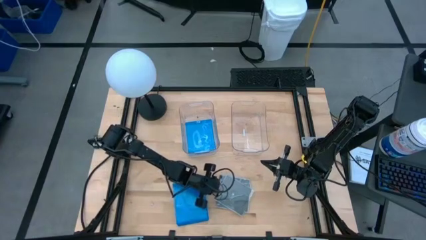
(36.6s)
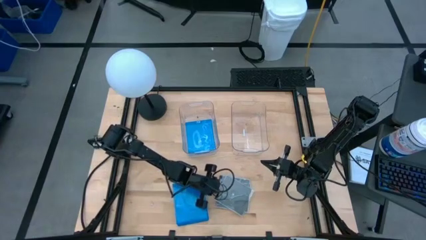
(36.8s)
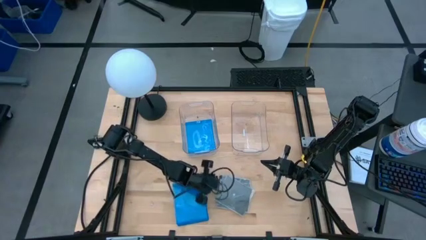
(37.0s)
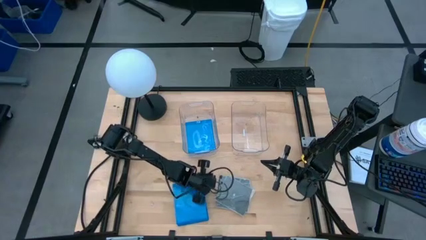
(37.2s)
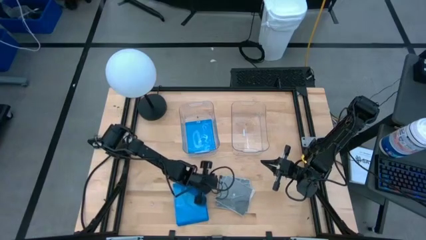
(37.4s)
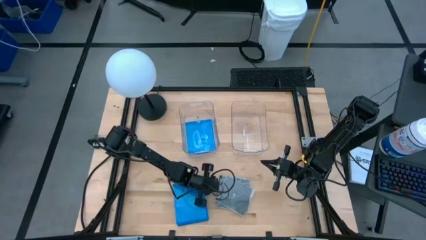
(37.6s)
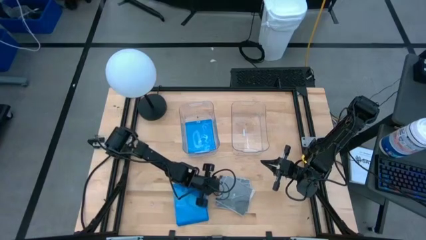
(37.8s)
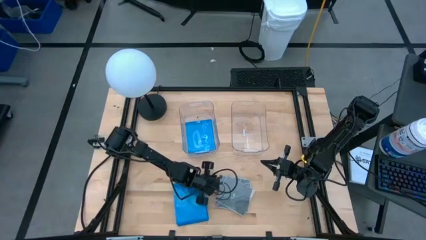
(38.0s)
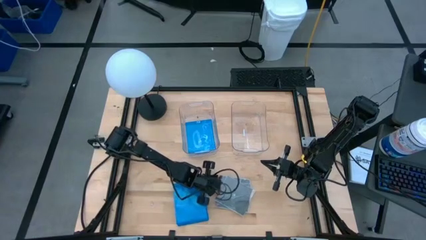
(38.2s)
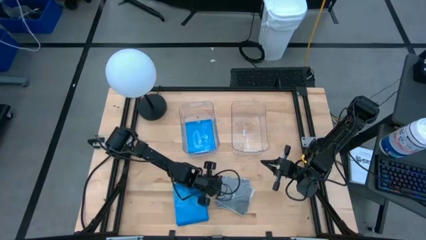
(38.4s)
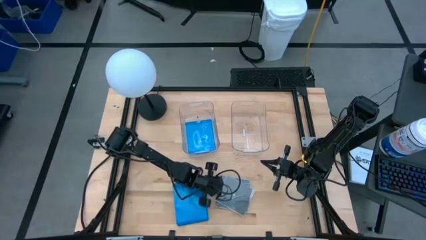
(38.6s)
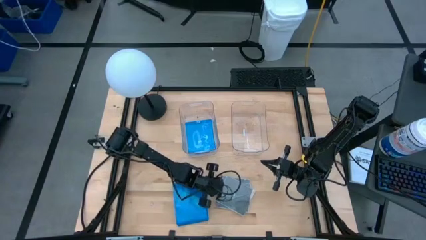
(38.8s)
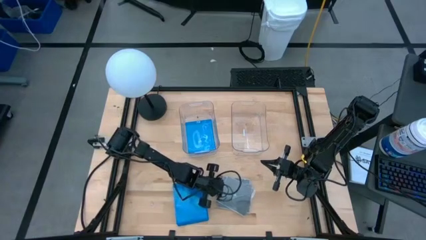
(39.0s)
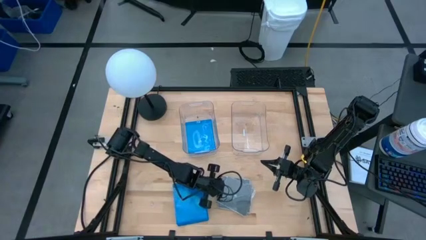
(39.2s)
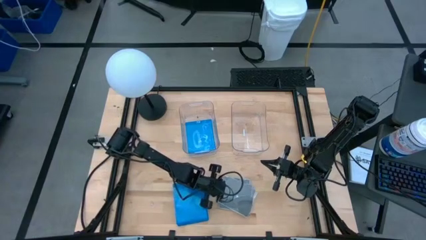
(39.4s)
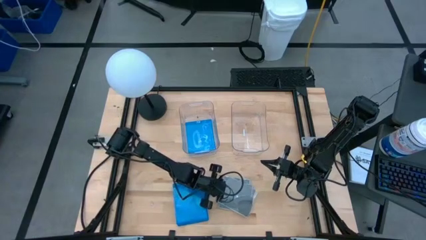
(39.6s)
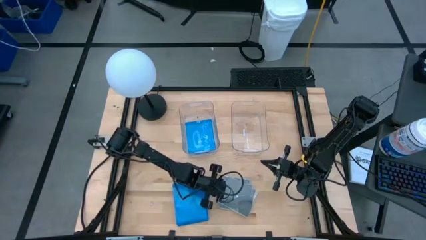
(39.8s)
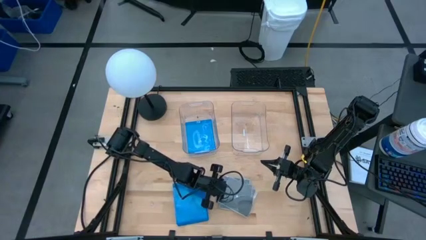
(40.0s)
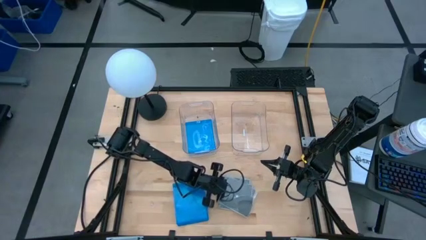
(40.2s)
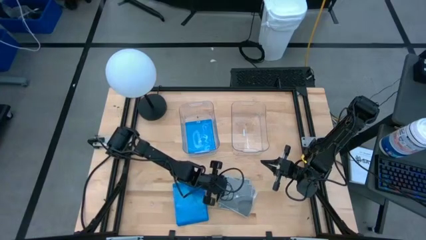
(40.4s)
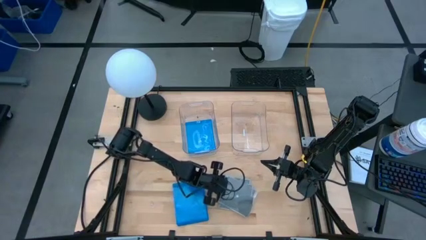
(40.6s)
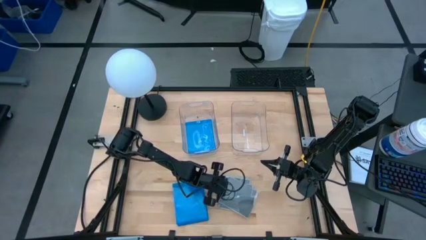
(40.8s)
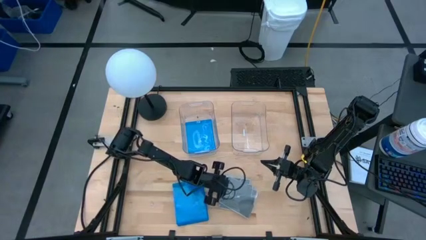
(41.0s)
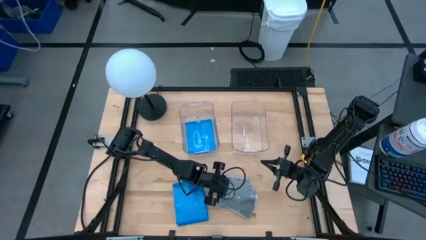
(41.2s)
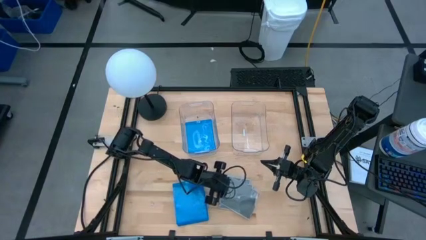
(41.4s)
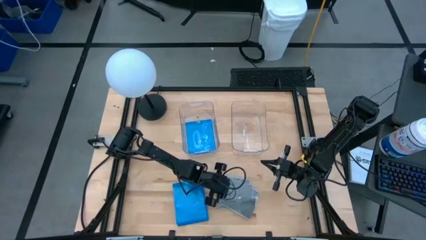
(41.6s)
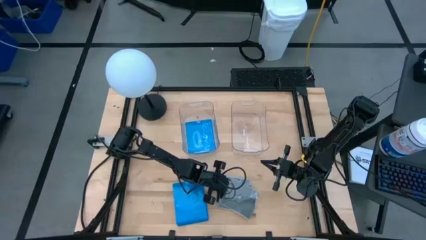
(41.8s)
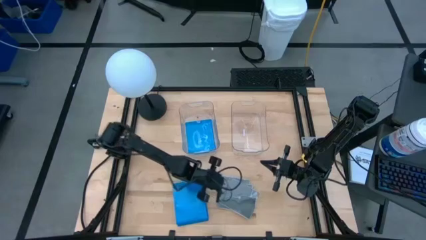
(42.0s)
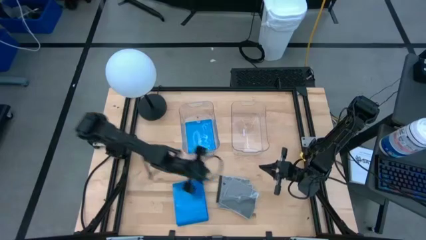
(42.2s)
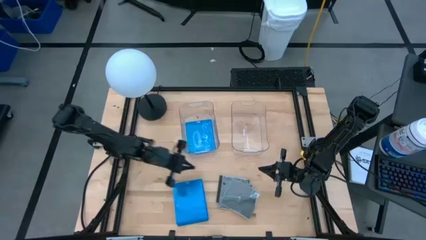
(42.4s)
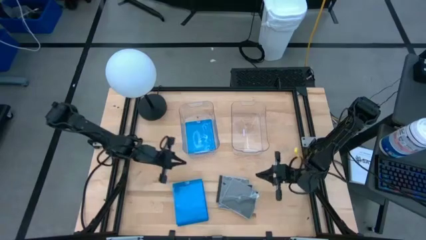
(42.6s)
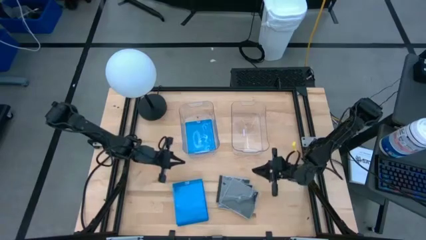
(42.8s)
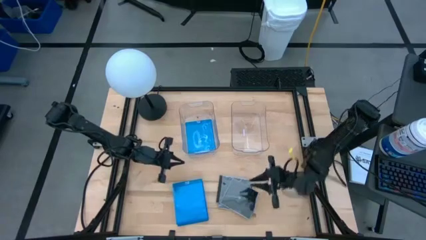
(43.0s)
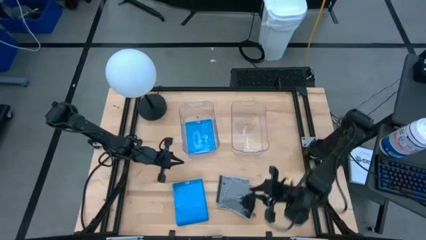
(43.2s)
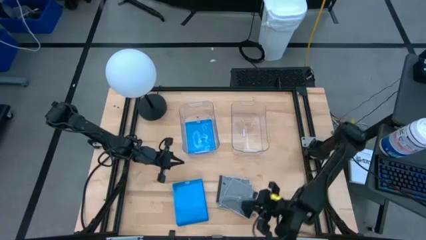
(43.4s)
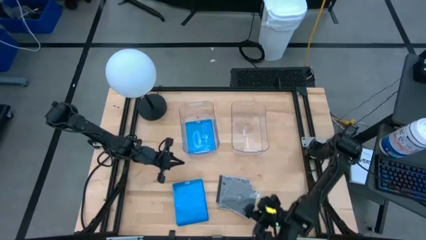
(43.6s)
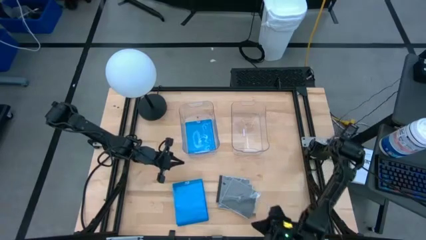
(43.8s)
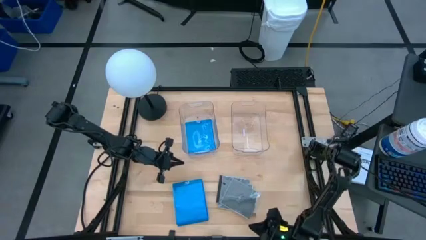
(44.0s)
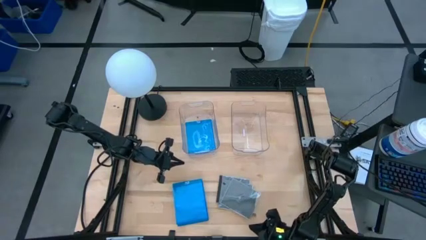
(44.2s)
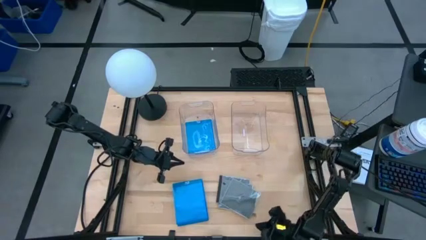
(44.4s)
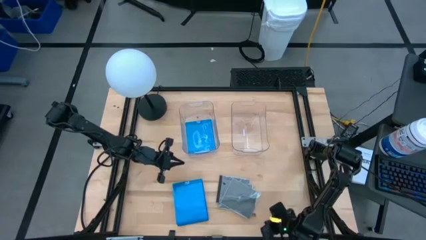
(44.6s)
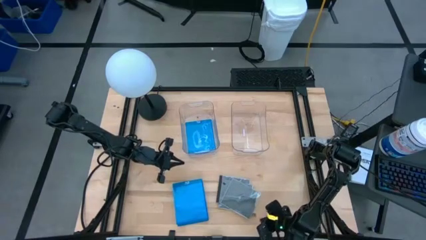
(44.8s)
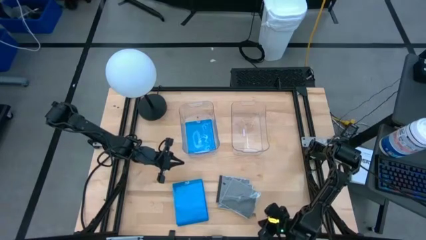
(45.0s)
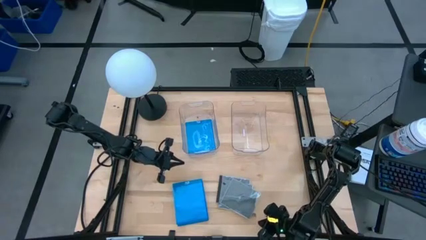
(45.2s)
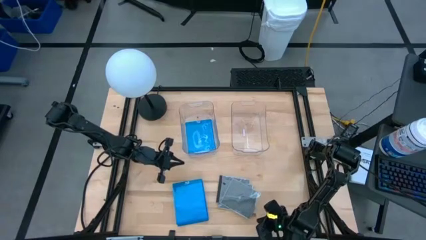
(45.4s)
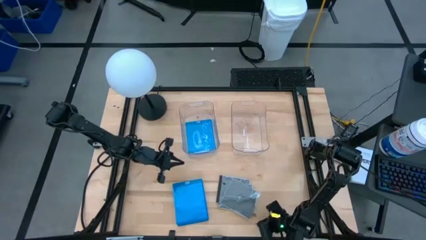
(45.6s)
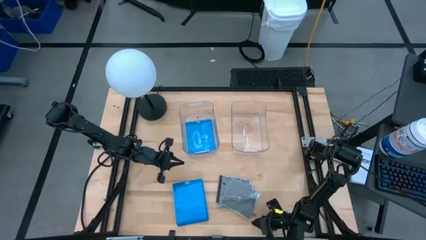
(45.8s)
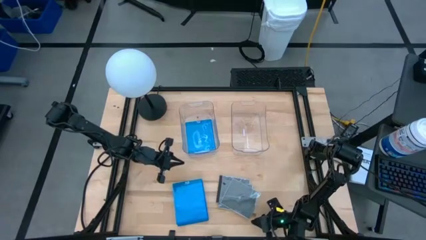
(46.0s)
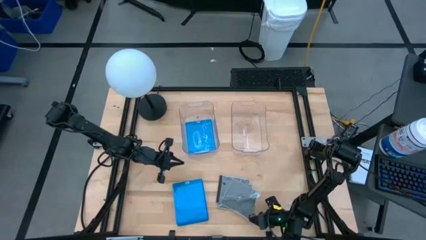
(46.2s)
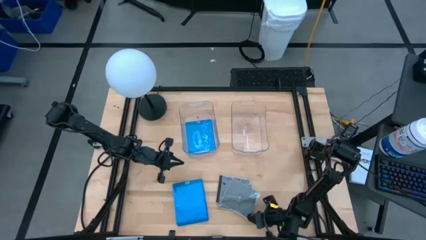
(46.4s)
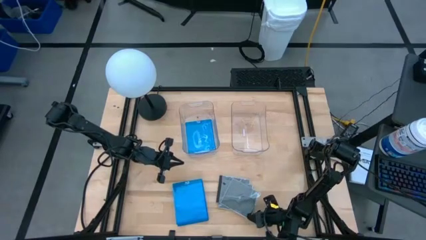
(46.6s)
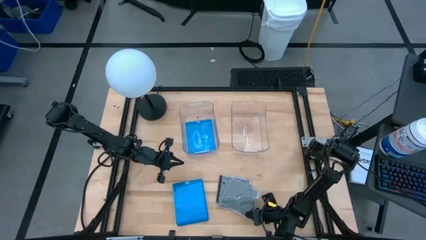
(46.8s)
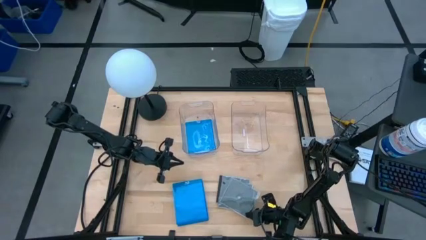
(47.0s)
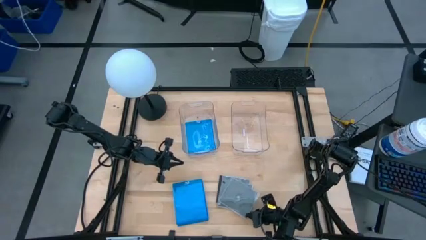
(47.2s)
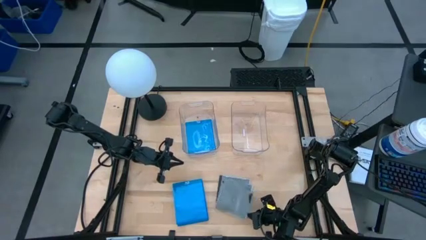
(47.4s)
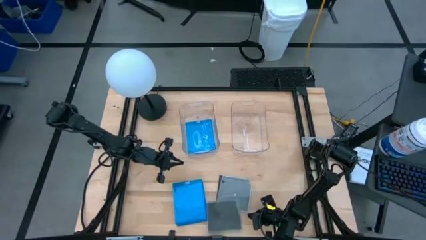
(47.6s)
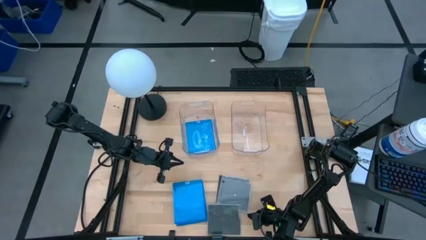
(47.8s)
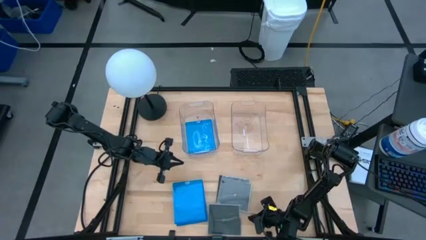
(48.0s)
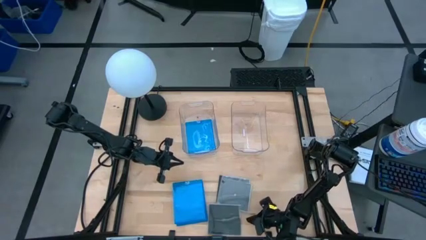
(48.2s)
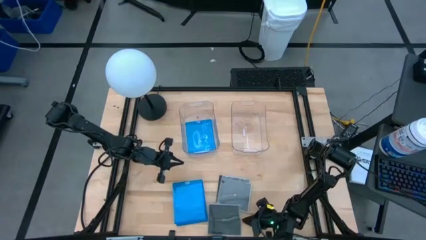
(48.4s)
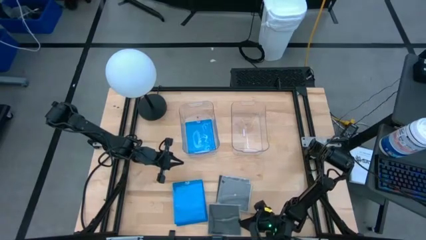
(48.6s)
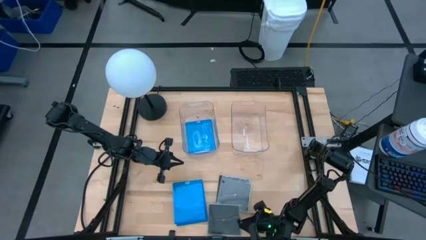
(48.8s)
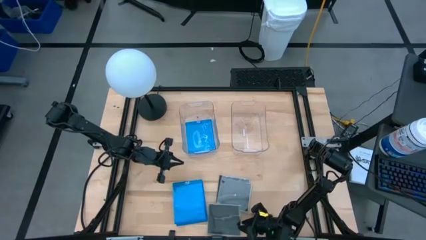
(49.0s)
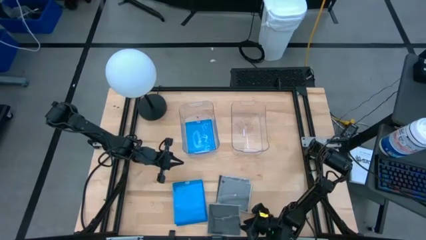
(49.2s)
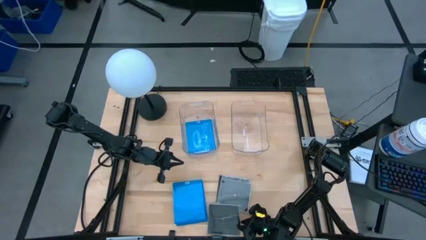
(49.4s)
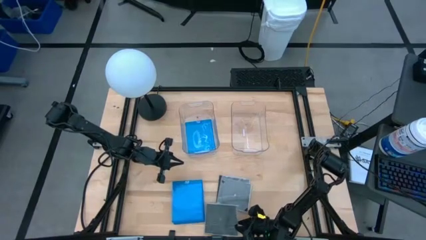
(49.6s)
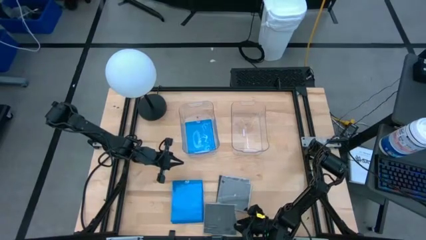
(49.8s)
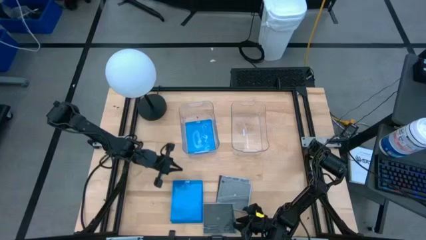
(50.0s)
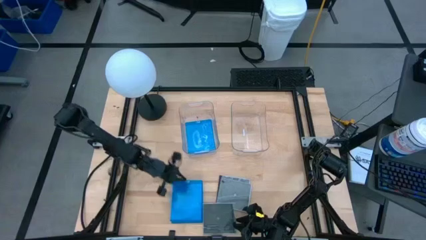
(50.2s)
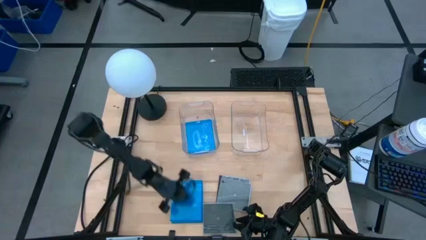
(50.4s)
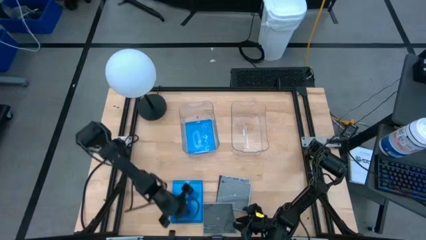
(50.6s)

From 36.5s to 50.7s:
Task: Pick & place jewel cases by type
Put the black cd case into the right transparent bin

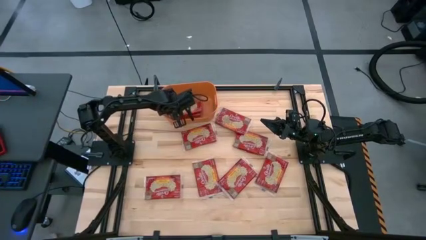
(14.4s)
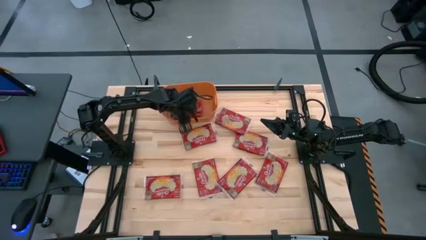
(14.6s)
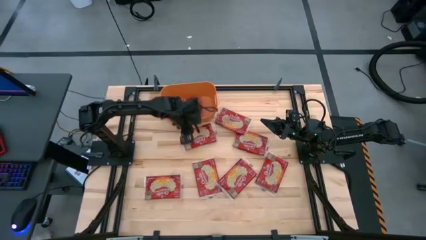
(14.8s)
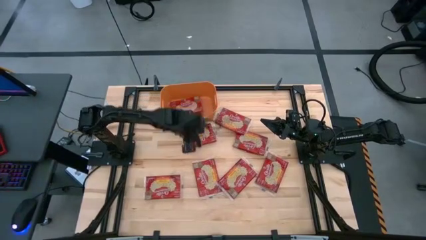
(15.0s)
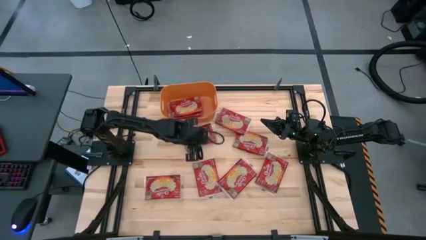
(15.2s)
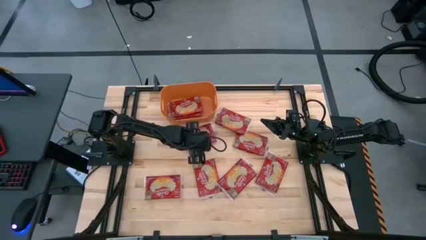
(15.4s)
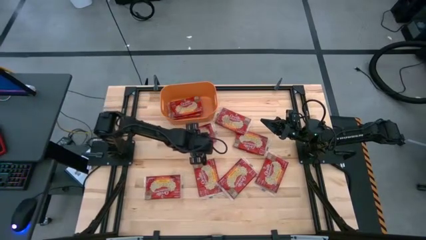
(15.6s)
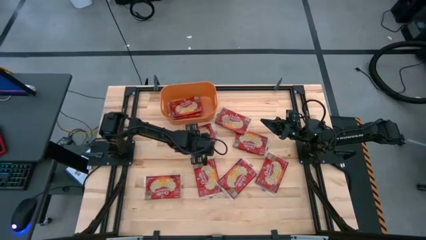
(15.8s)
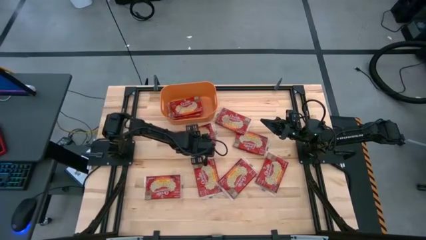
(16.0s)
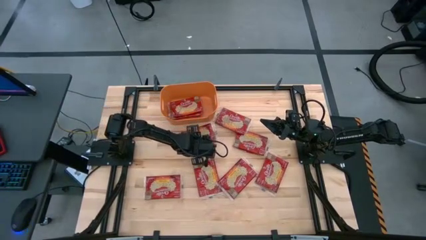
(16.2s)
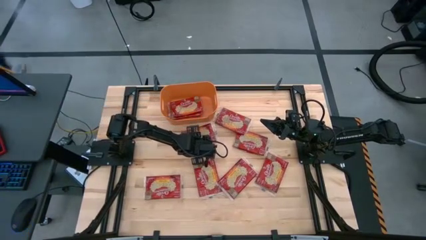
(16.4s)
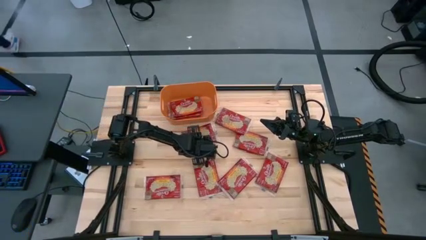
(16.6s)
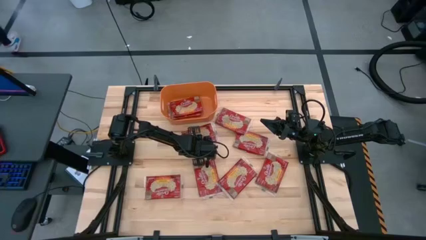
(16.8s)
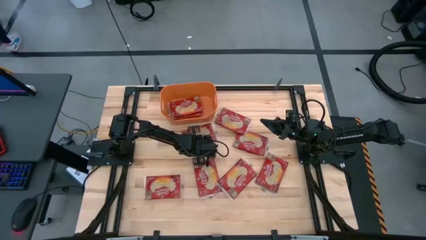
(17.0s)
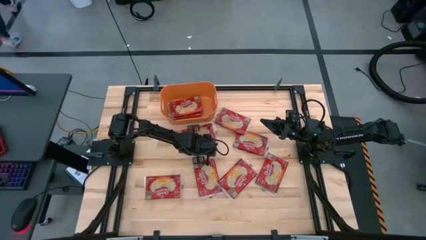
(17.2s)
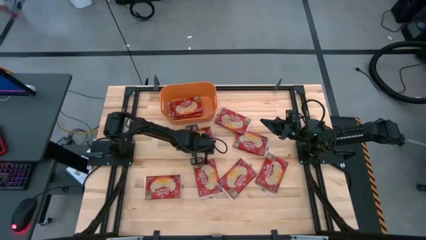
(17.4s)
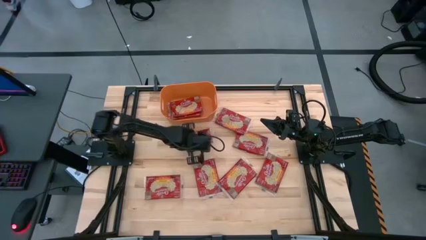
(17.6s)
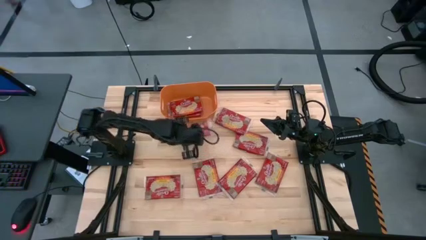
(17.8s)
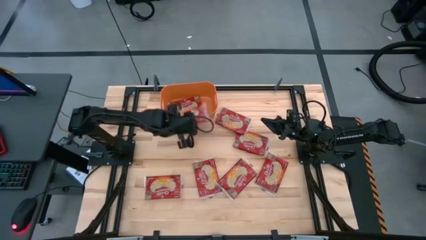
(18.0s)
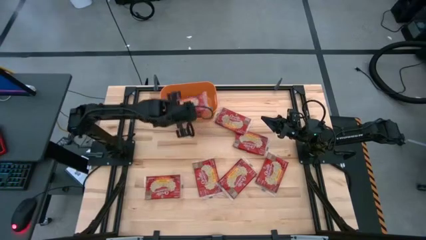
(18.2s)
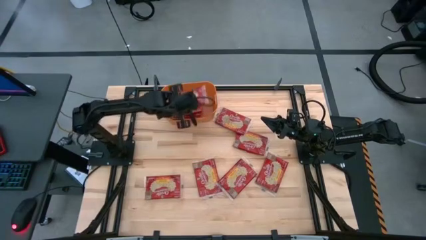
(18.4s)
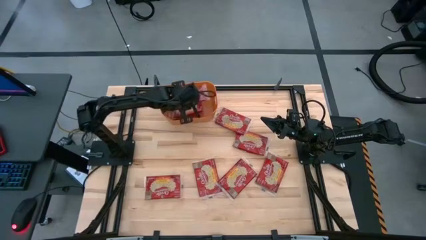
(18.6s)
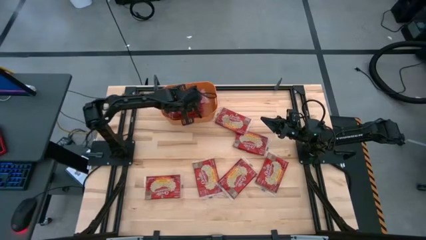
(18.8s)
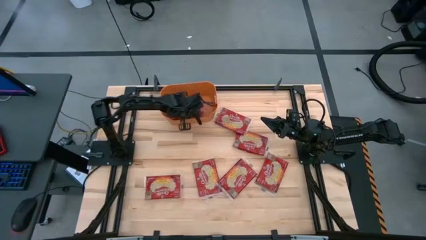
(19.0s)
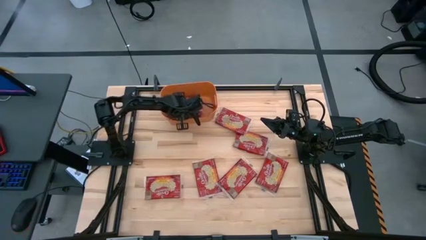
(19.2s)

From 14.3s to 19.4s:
Task: Sort popcorn bags into baskets
Put the red popcorn bag into the orange bin
